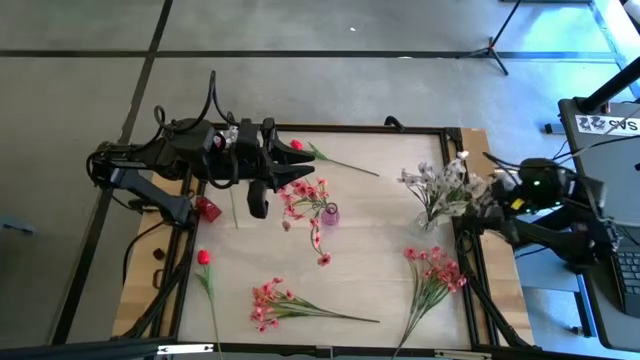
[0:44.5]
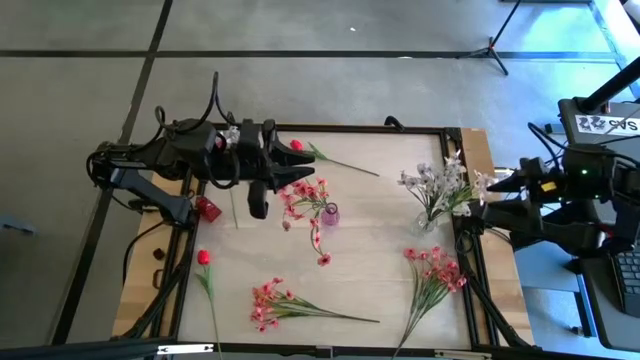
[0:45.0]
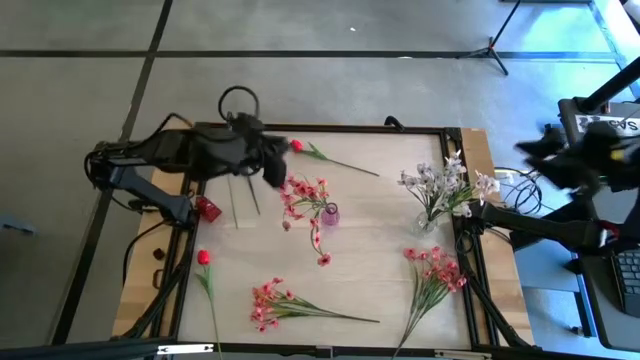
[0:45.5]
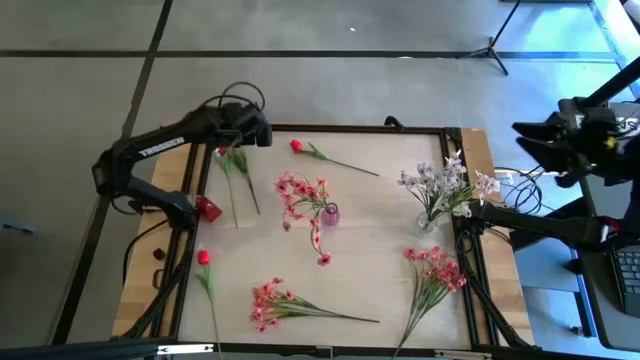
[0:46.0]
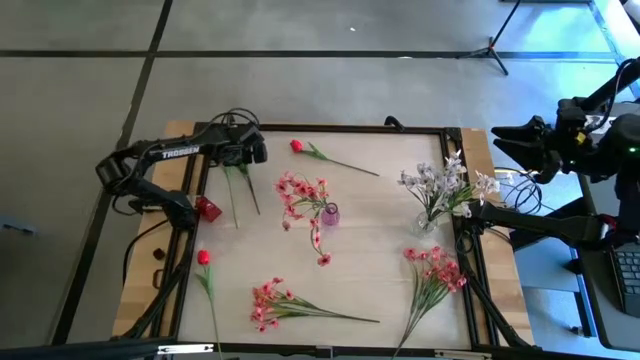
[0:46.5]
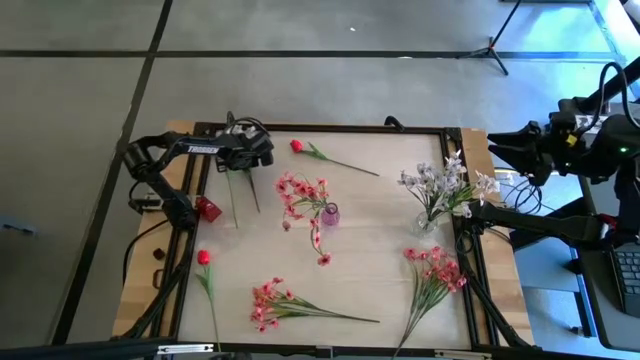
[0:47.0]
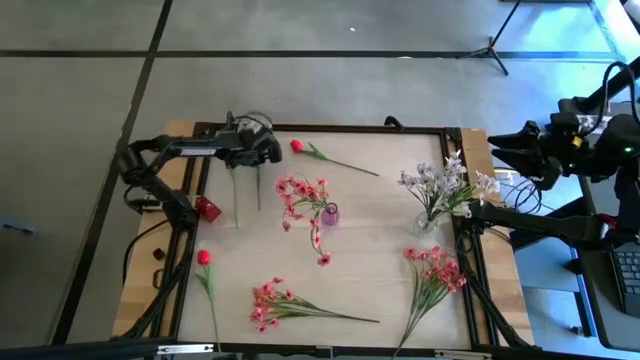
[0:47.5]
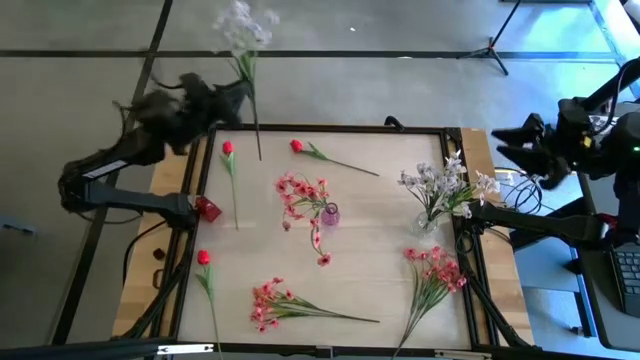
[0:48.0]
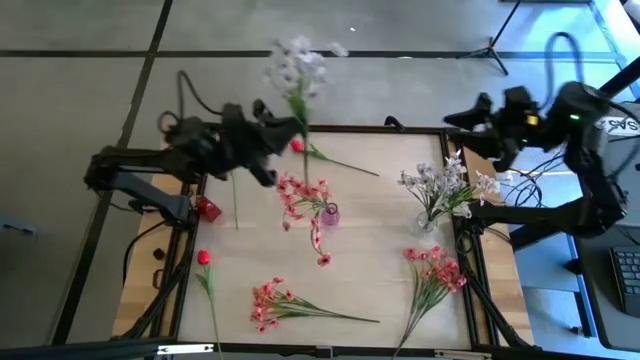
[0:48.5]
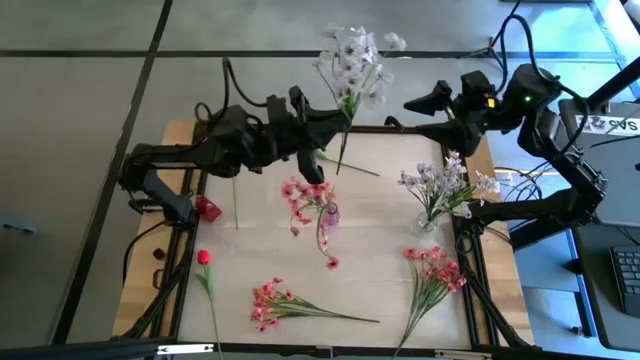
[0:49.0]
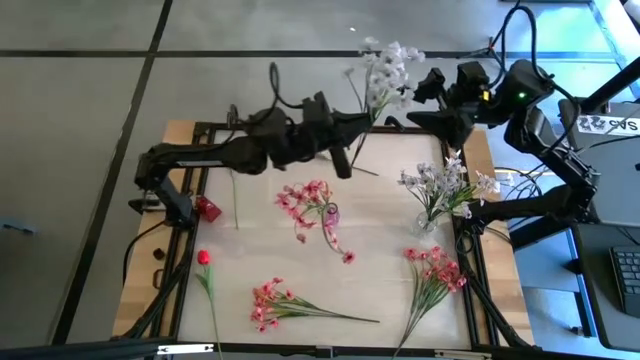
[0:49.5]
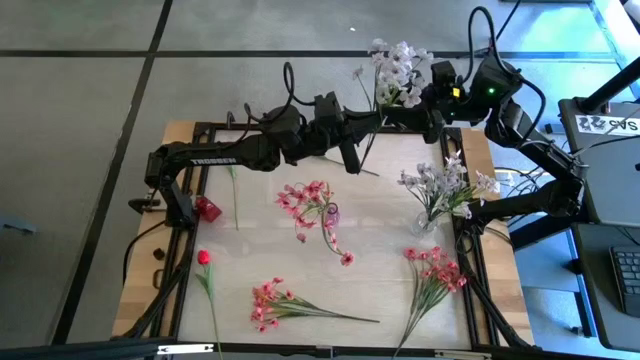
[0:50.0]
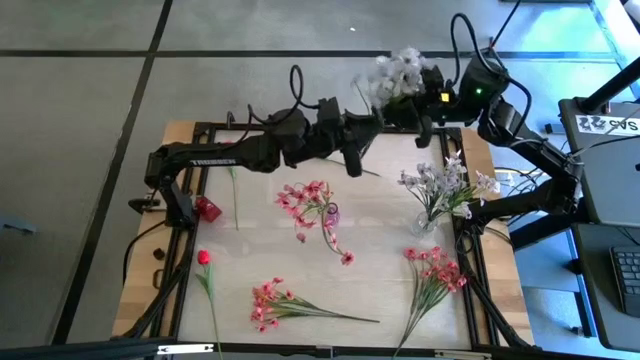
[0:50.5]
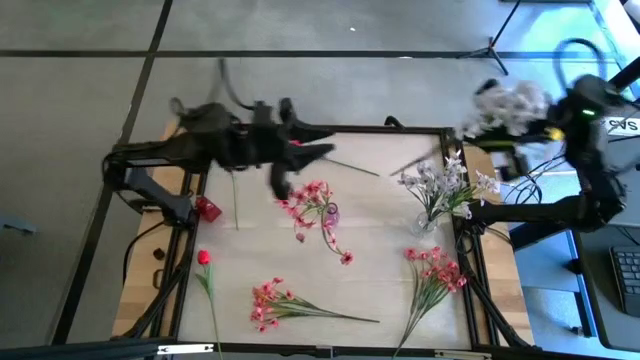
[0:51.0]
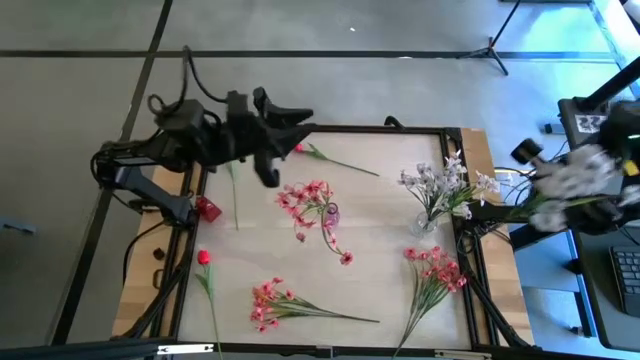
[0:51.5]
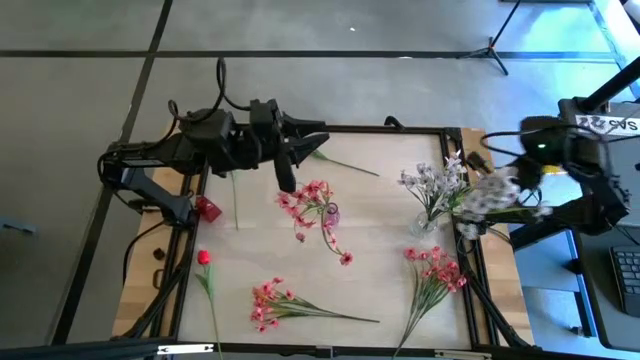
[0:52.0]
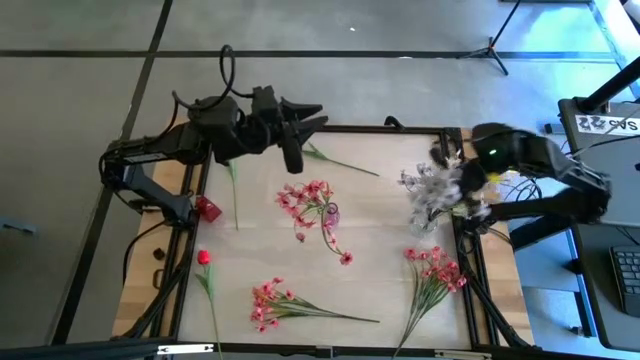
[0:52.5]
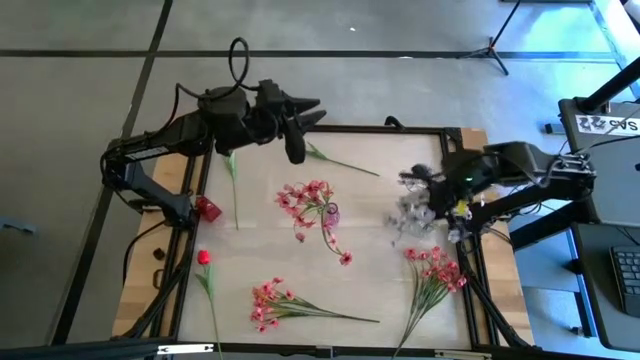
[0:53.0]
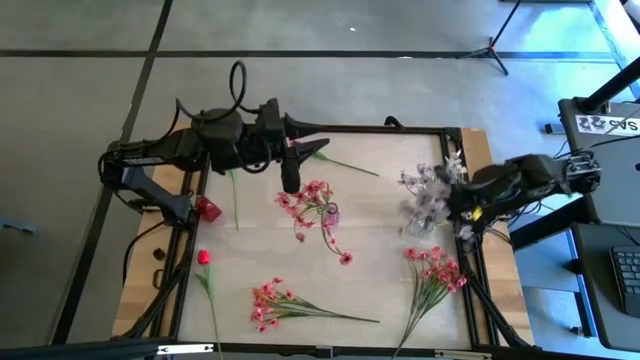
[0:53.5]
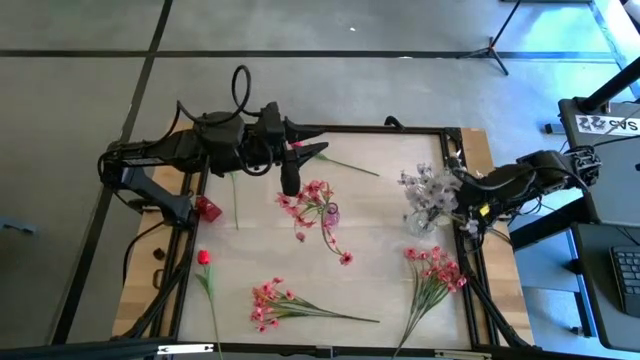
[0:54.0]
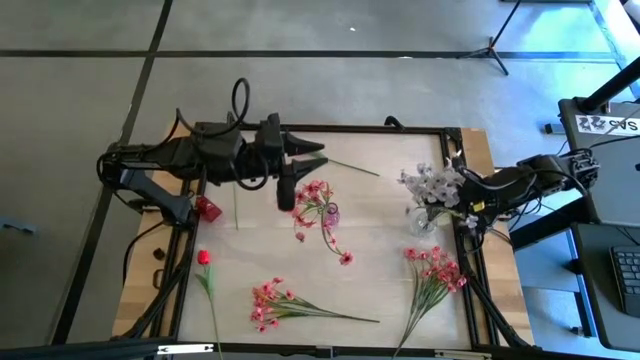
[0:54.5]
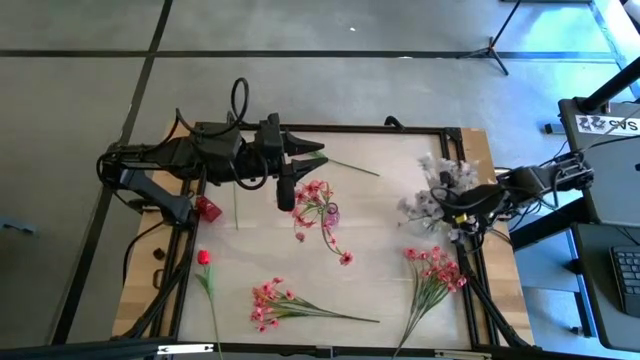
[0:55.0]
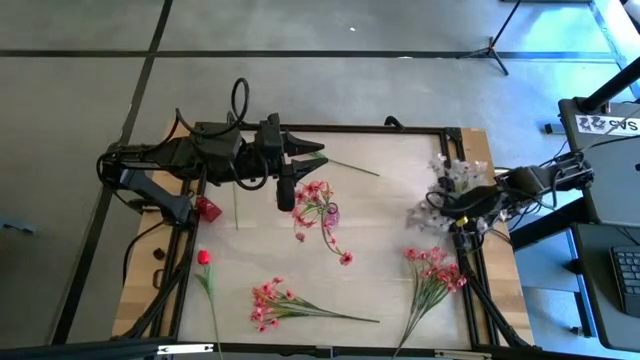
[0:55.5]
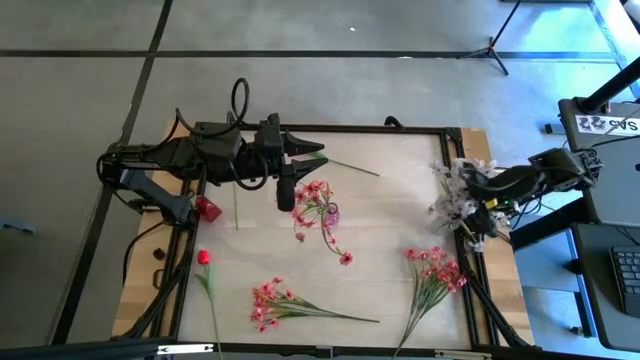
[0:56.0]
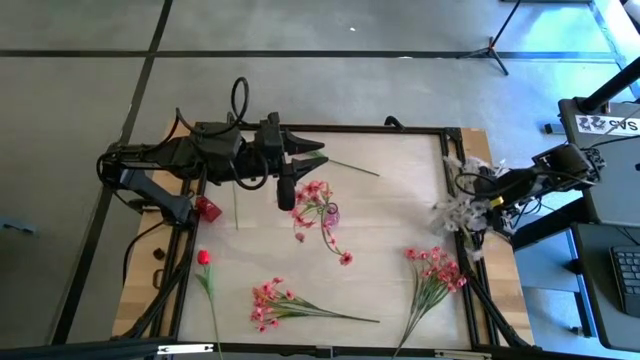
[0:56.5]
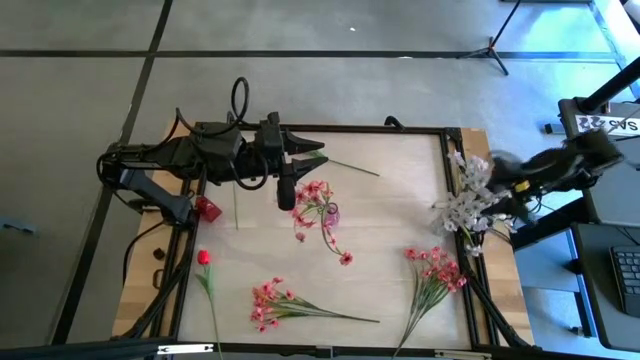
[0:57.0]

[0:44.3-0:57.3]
Task: Sort flowers into vase by color
Put the white flowers into the transparent vase

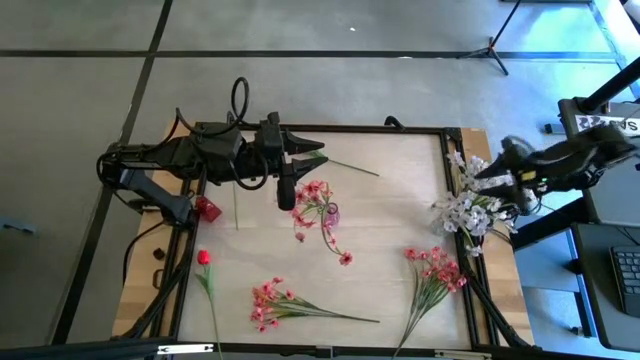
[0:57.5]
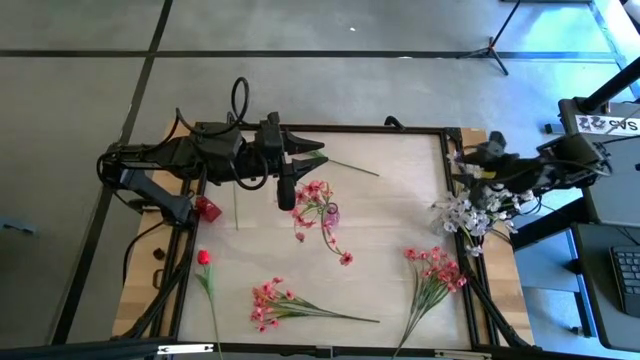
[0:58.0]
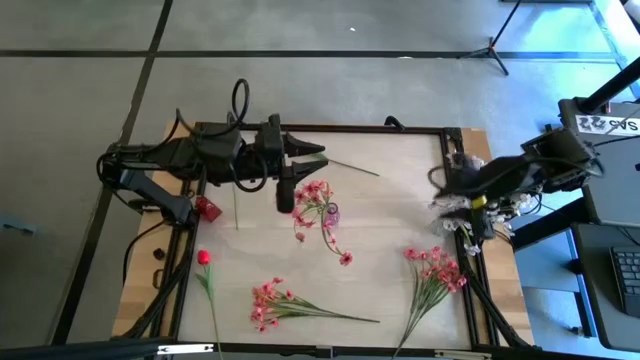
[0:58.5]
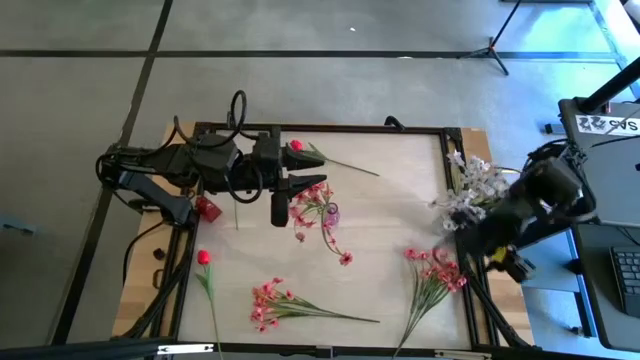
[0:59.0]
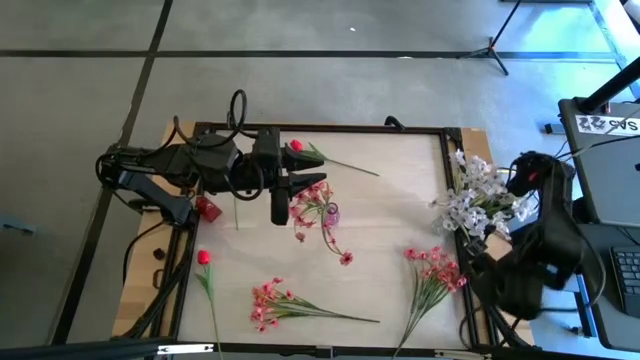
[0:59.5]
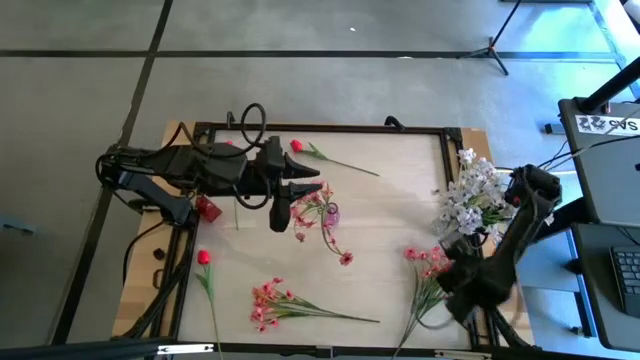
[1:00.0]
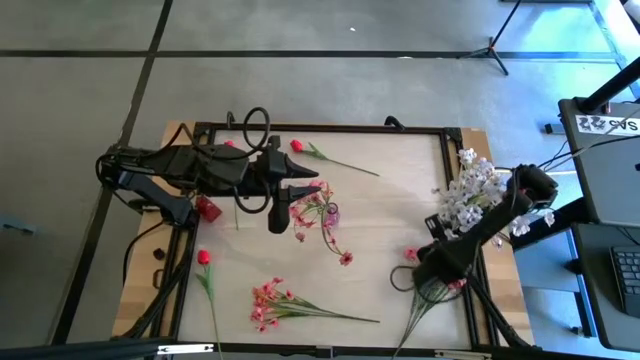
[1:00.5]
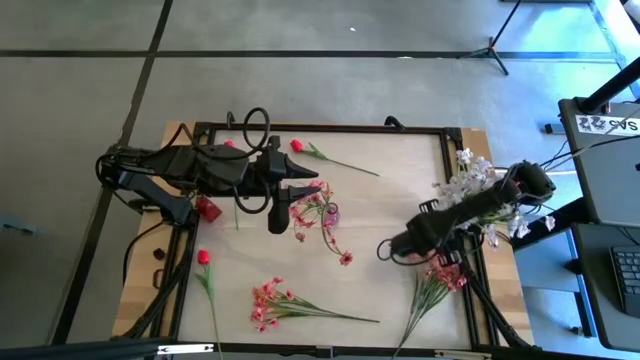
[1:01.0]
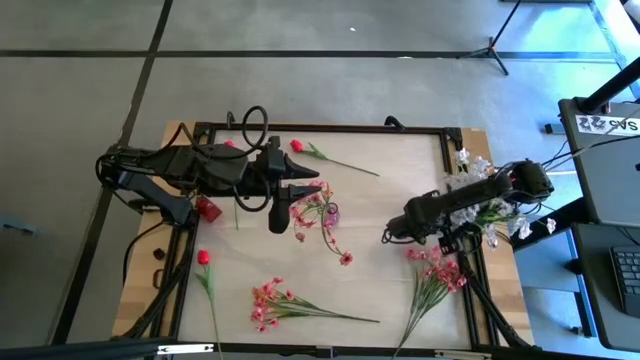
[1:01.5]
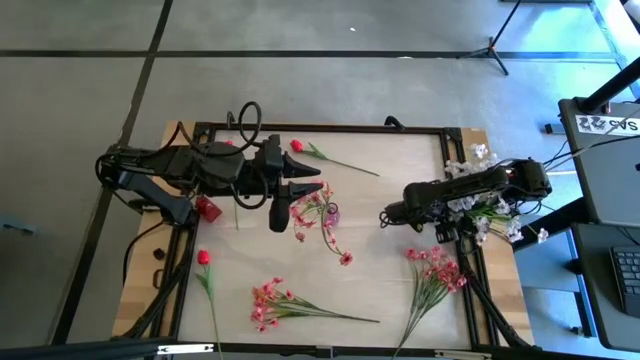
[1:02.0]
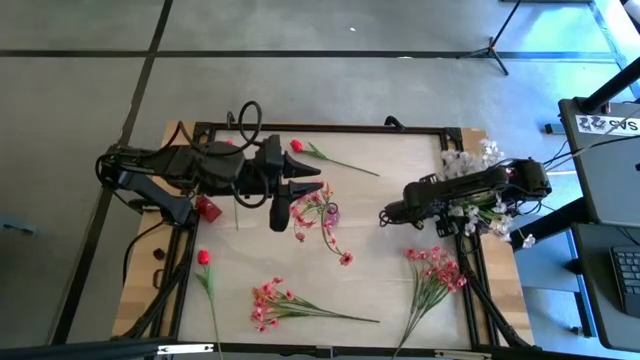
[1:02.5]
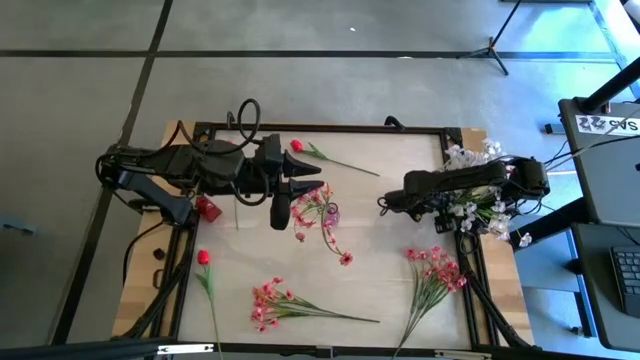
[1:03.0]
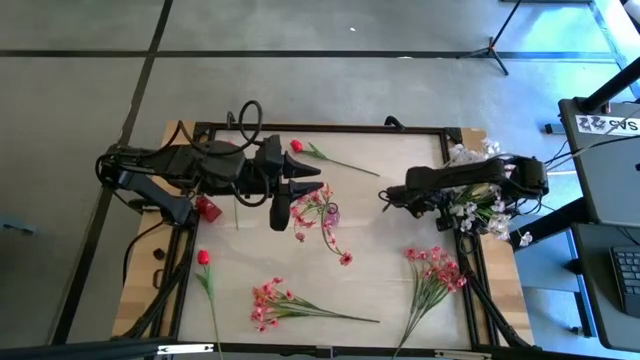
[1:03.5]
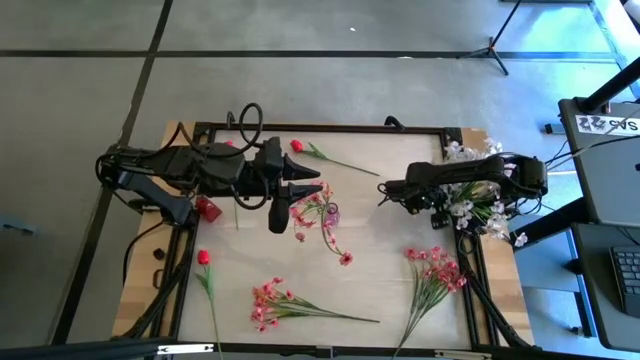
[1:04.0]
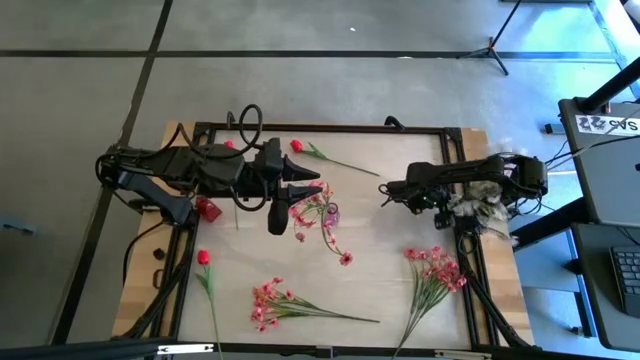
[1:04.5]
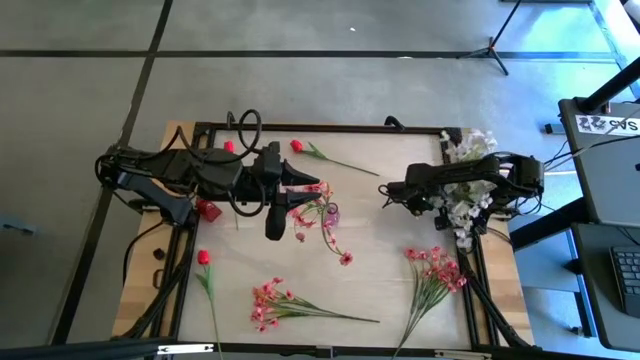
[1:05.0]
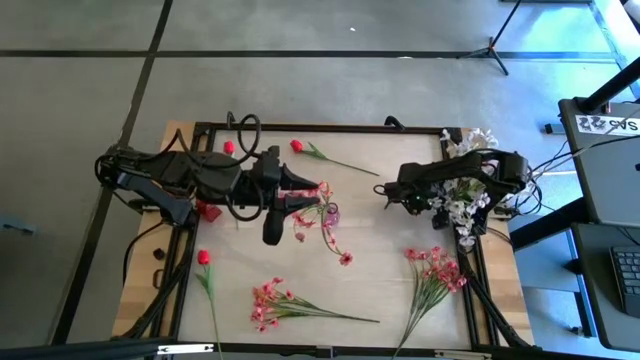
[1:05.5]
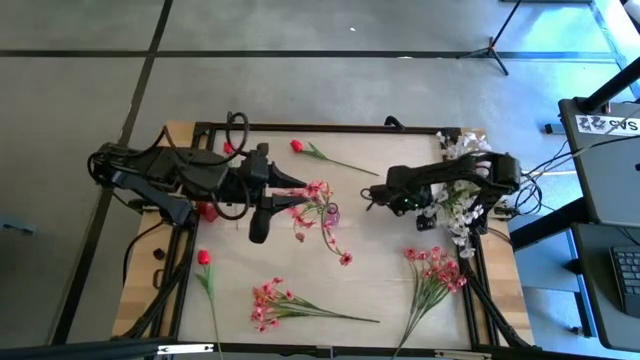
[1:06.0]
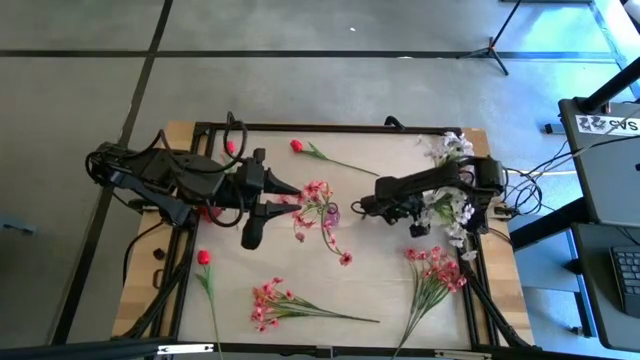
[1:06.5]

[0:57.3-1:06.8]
Adjust the transparent vase
